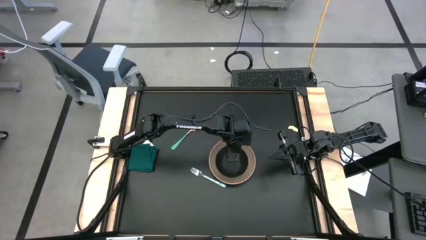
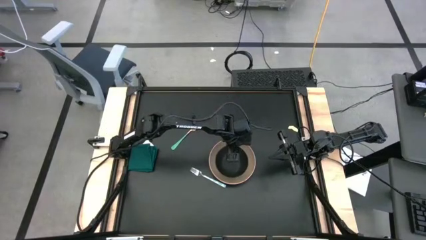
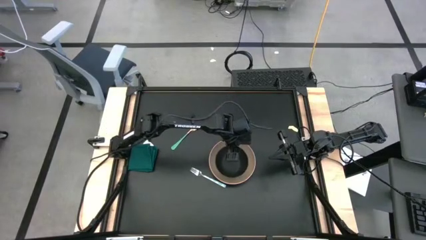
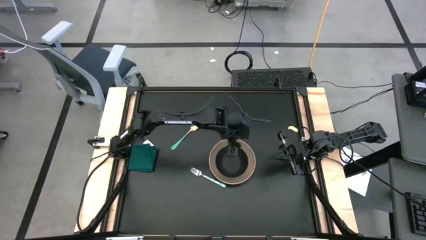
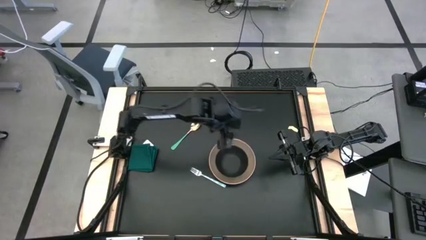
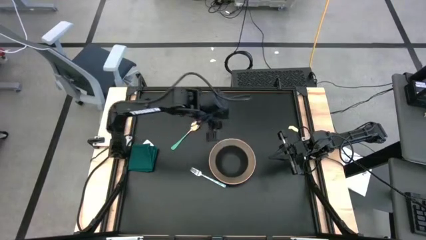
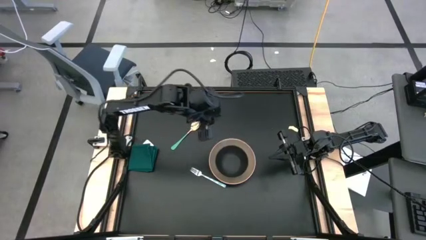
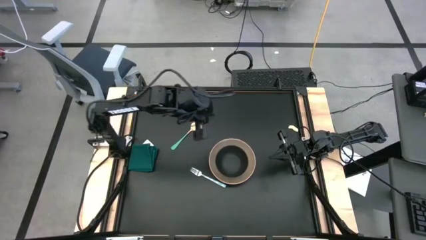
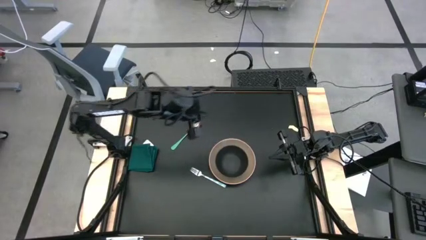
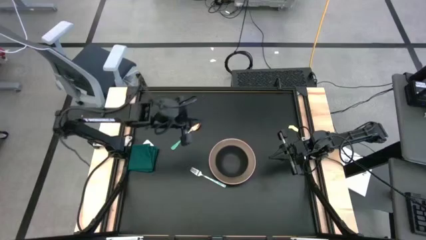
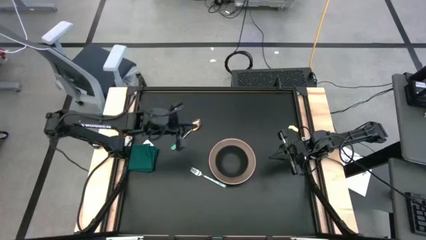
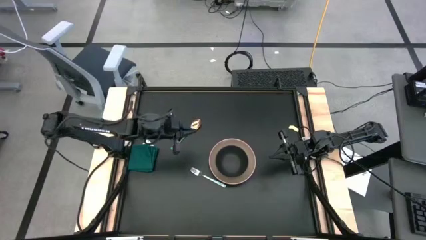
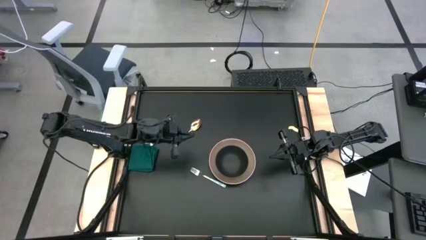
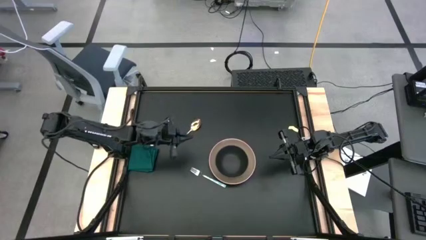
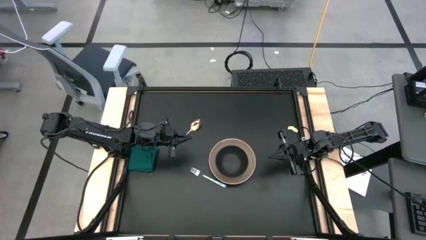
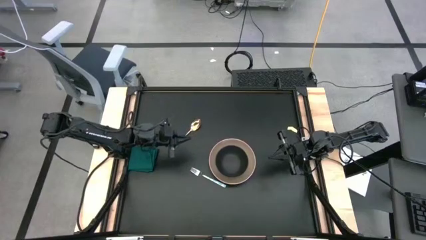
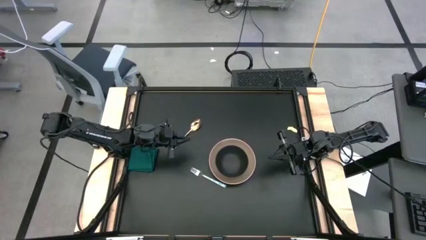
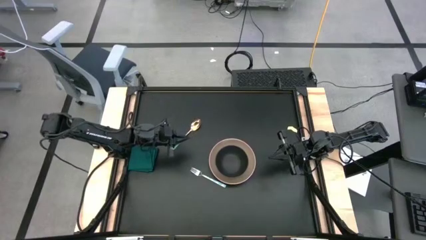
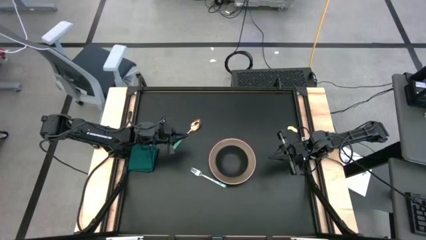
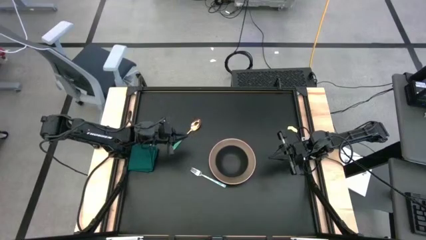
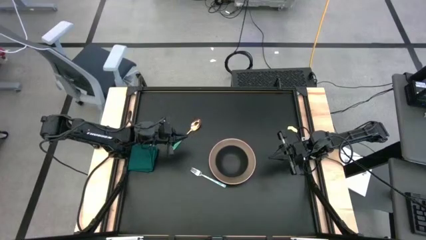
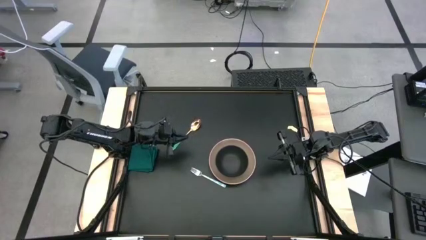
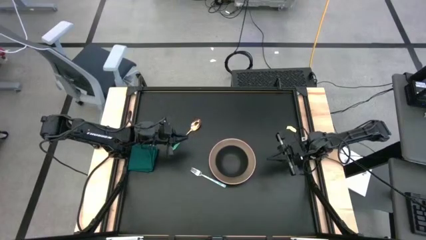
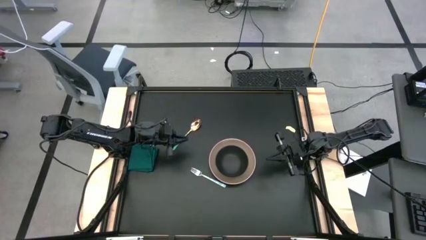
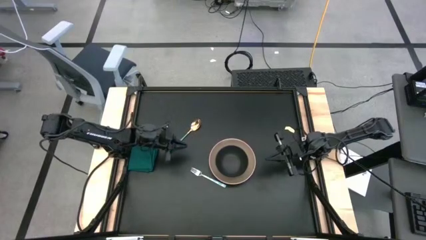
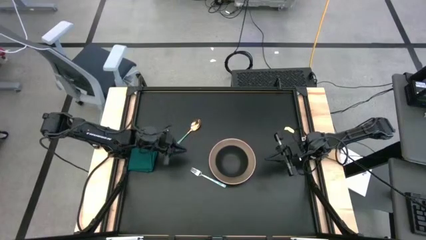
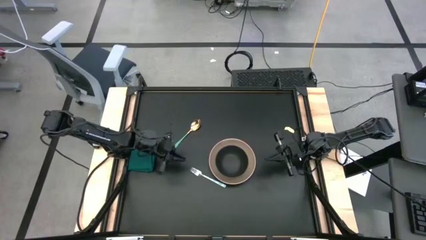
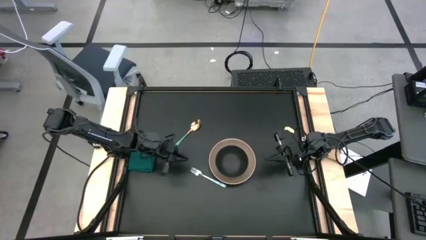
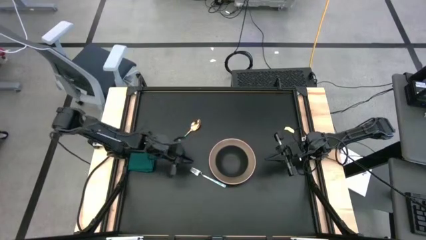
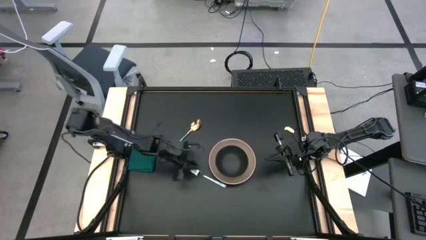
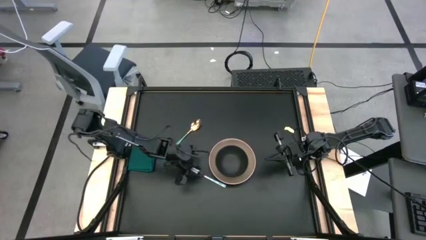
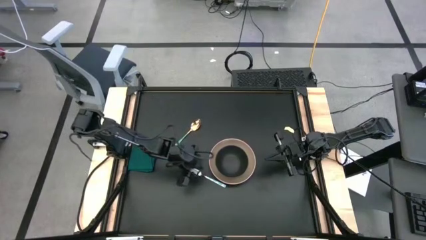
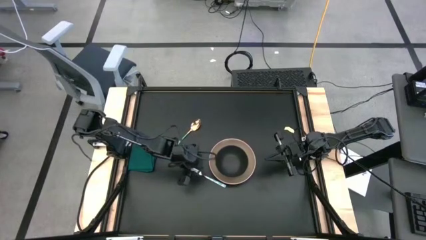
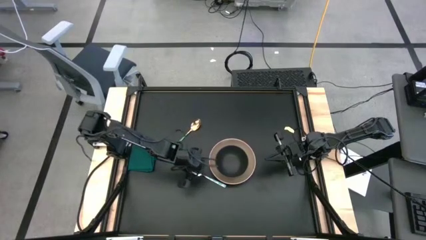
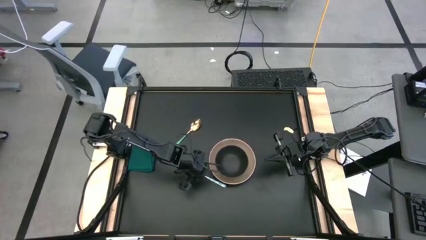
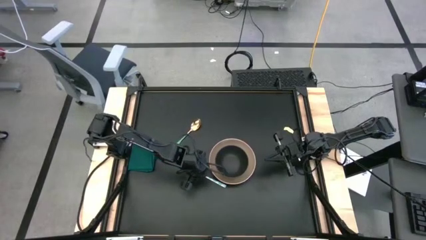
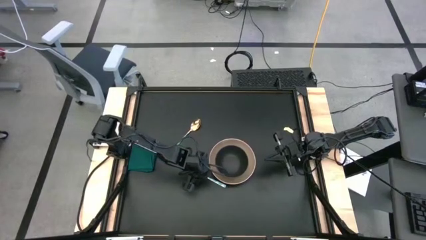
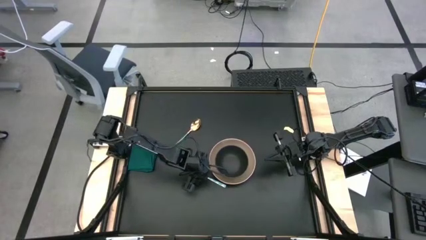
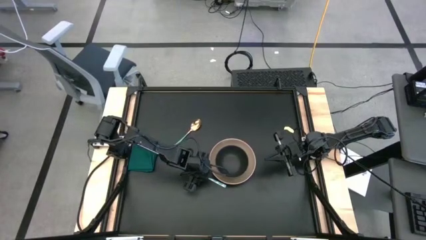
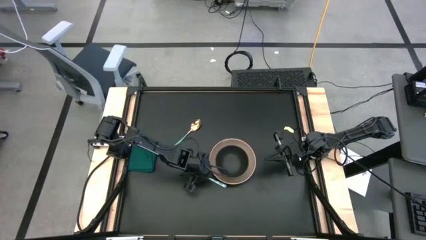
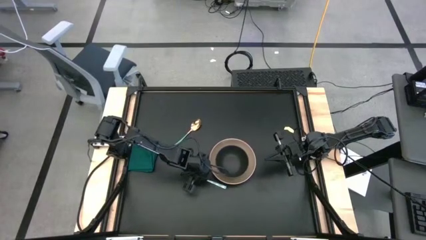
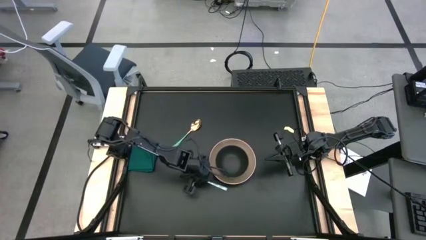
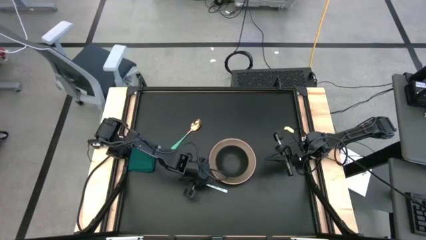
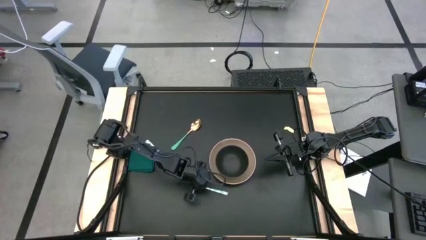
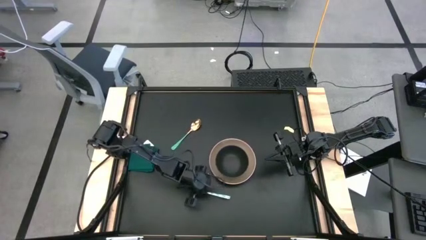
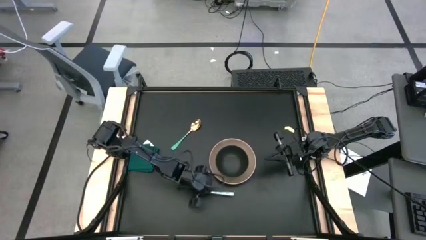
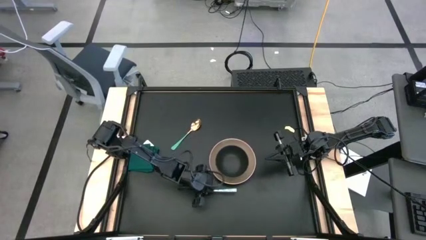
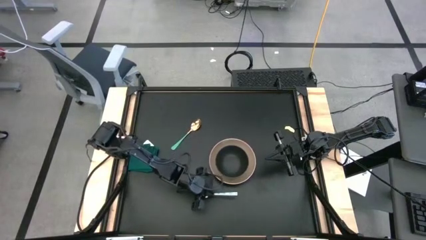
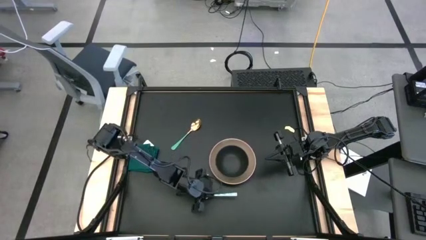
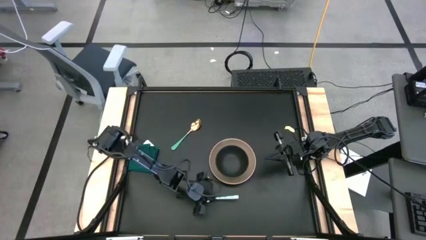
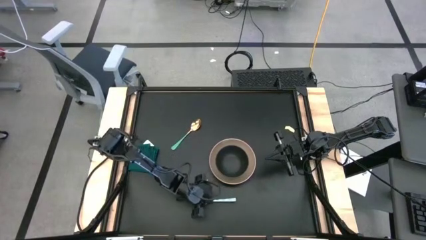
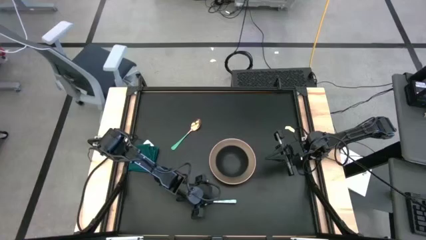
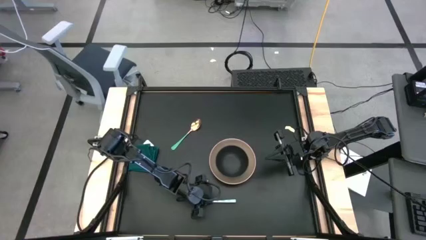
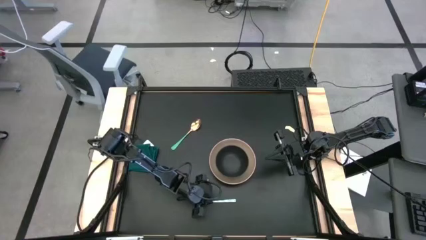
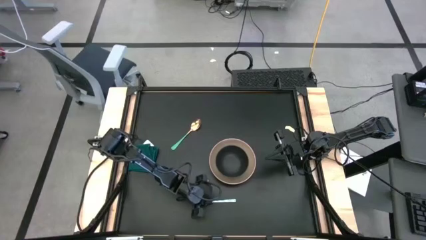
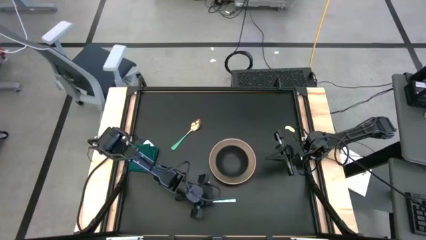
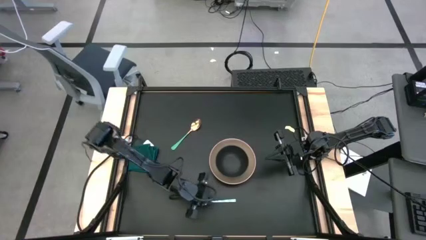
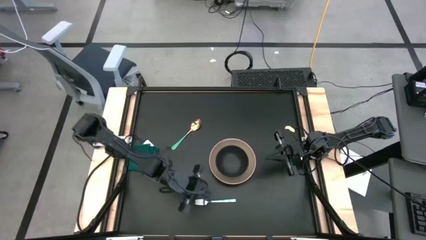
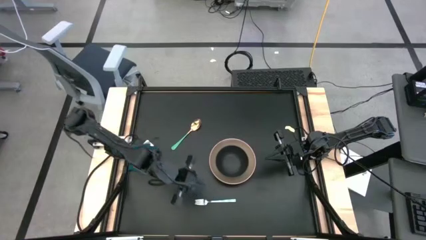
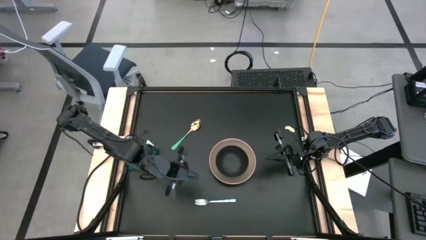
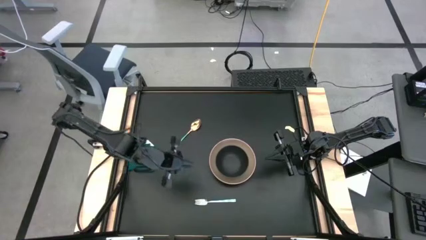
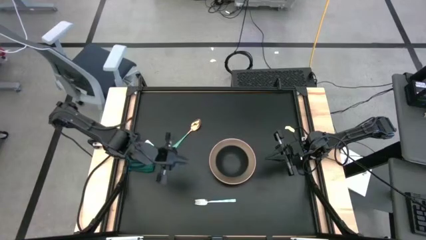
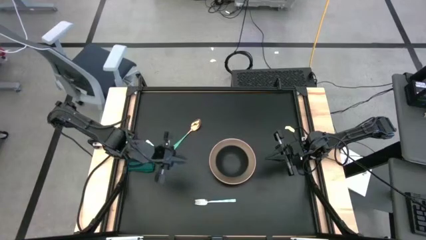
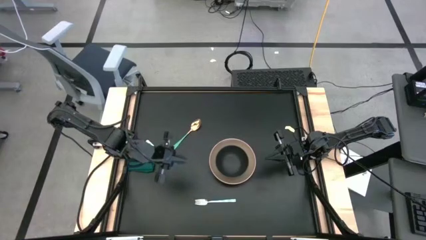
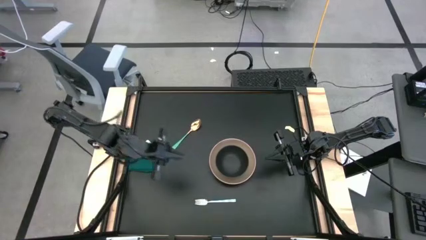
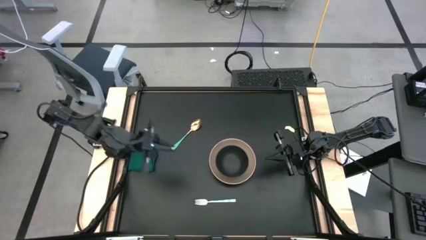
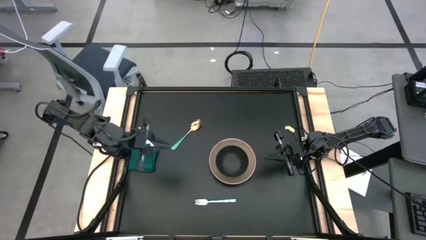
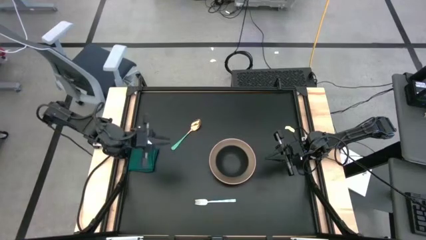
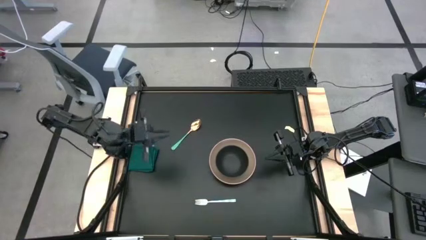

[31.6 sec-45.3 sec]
Task: Set table place
Put the fork to the right of the plate
